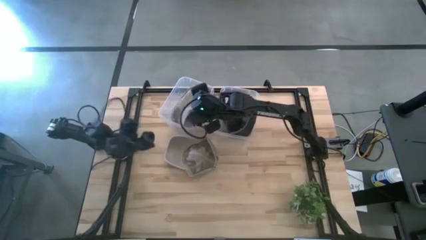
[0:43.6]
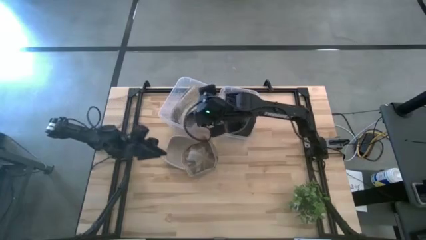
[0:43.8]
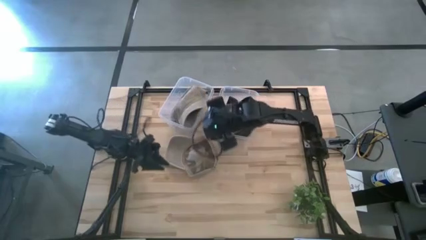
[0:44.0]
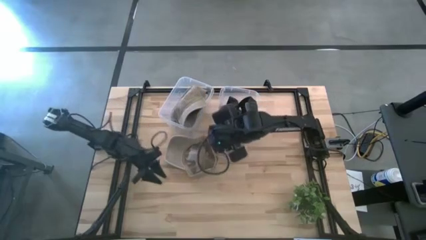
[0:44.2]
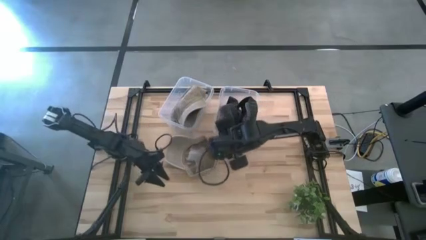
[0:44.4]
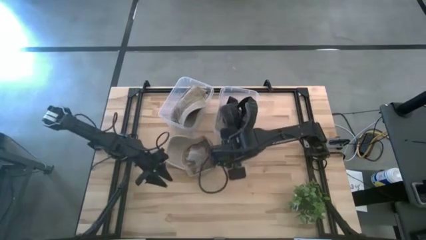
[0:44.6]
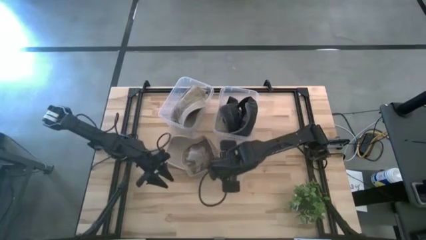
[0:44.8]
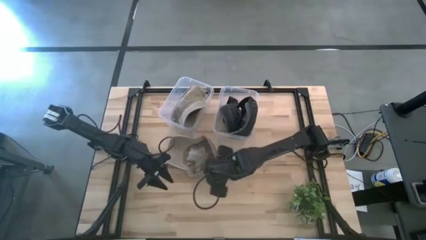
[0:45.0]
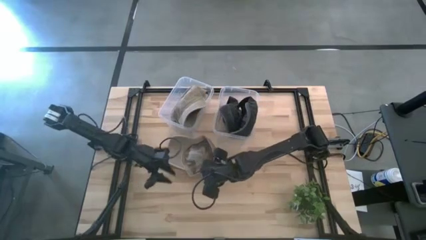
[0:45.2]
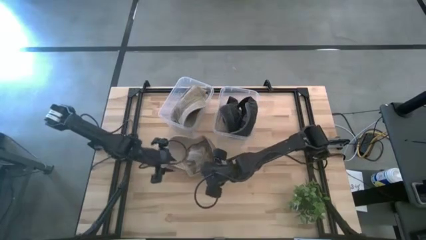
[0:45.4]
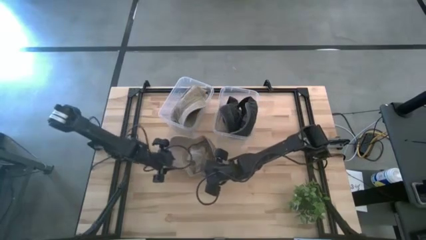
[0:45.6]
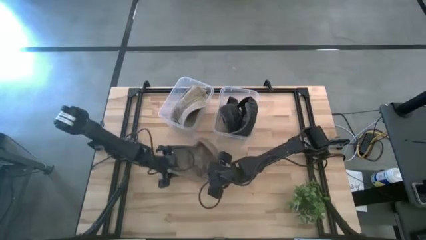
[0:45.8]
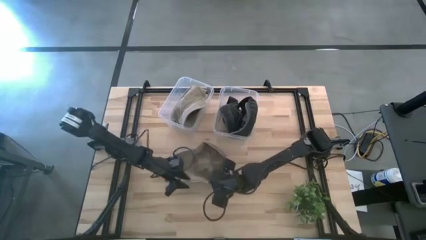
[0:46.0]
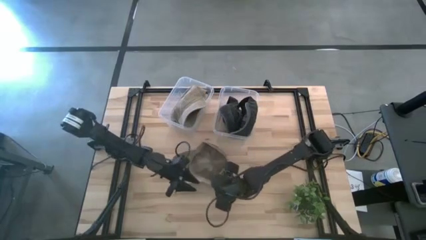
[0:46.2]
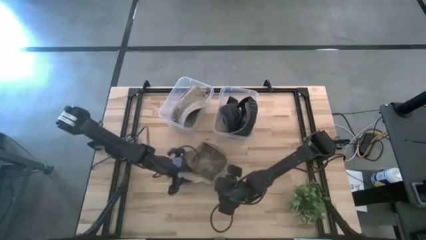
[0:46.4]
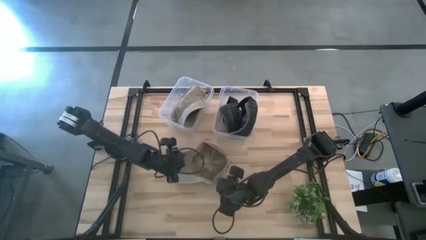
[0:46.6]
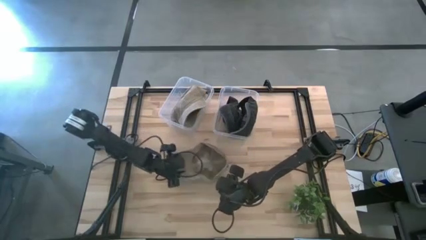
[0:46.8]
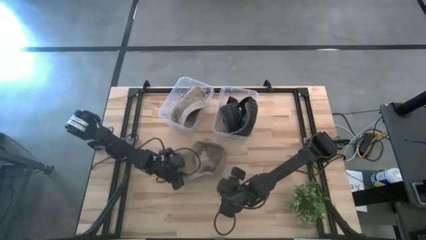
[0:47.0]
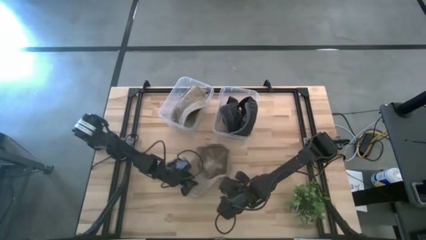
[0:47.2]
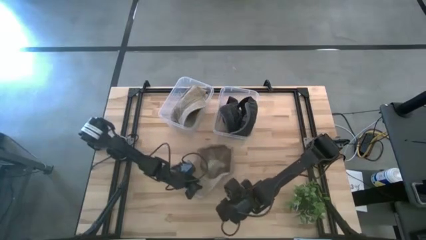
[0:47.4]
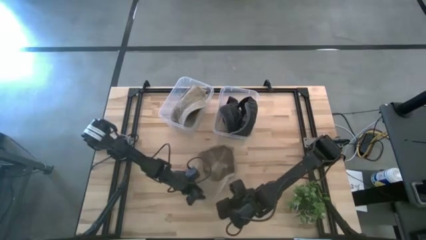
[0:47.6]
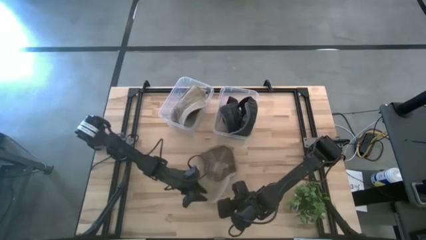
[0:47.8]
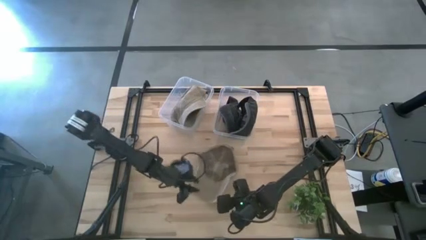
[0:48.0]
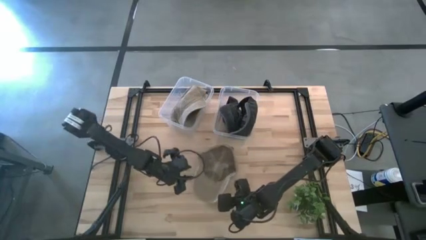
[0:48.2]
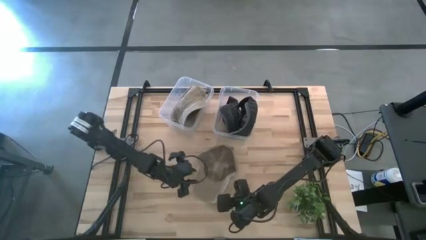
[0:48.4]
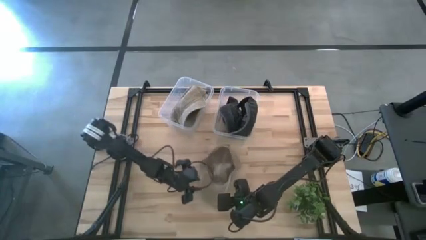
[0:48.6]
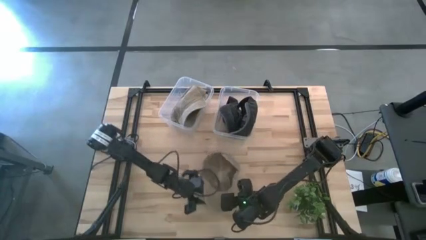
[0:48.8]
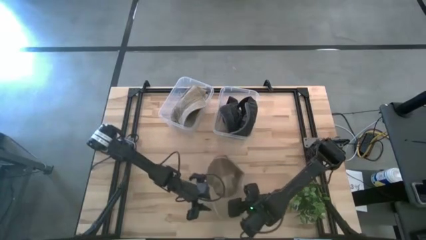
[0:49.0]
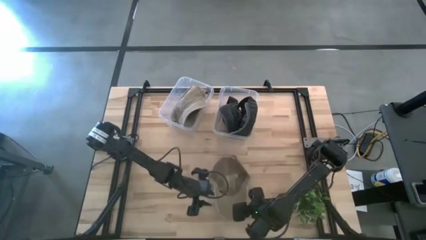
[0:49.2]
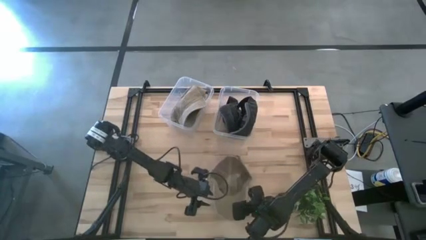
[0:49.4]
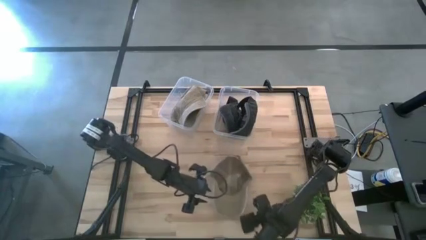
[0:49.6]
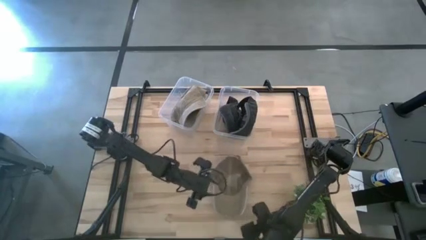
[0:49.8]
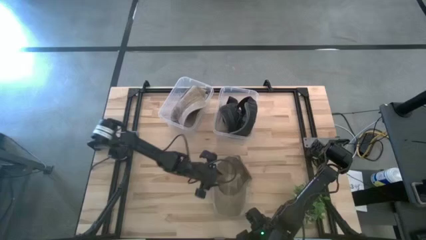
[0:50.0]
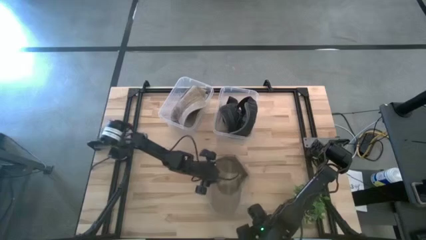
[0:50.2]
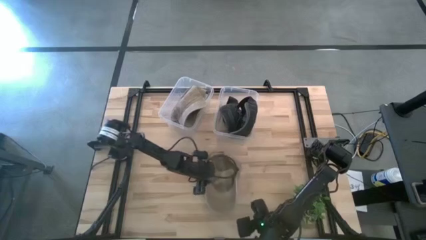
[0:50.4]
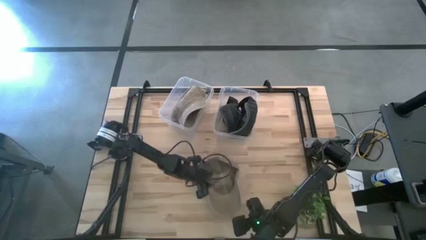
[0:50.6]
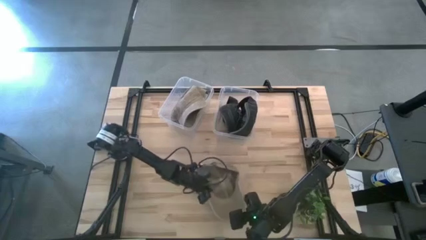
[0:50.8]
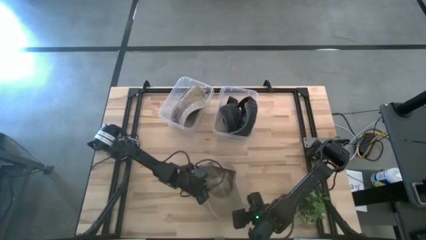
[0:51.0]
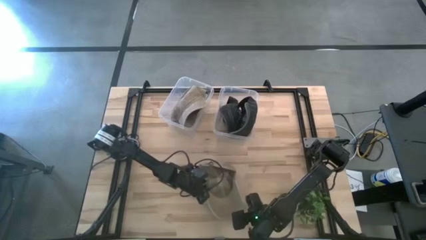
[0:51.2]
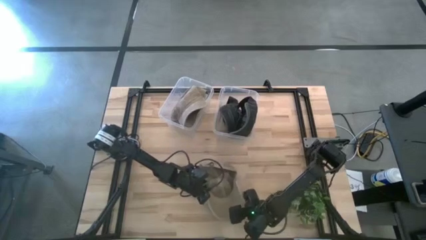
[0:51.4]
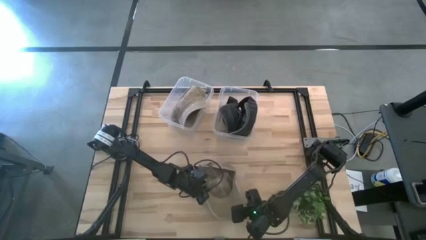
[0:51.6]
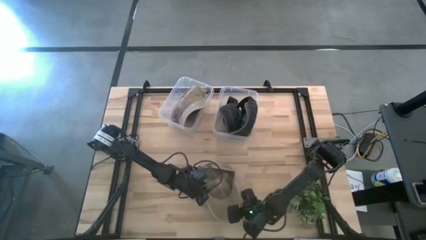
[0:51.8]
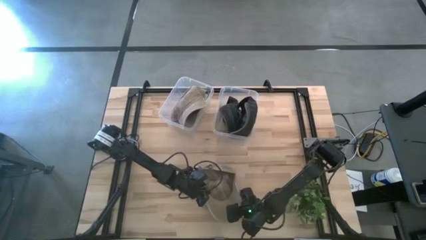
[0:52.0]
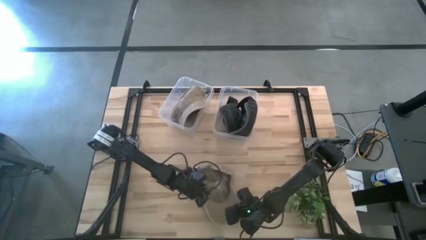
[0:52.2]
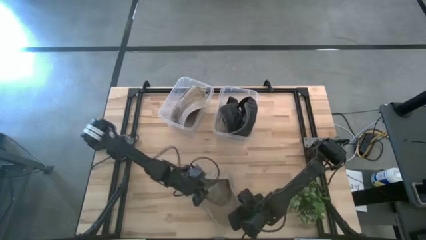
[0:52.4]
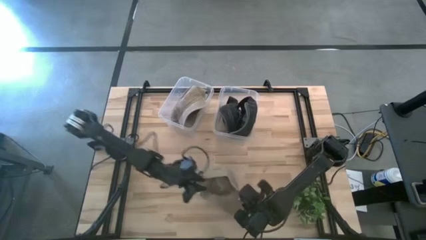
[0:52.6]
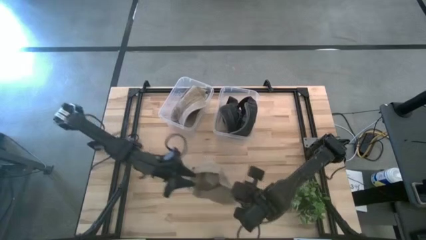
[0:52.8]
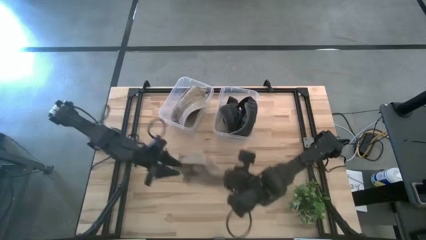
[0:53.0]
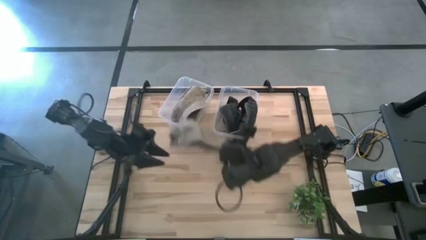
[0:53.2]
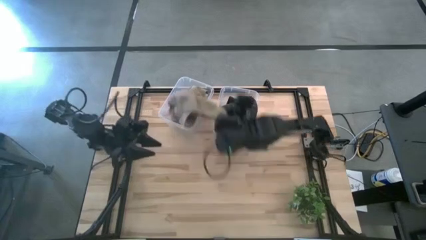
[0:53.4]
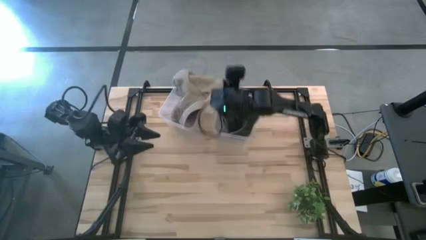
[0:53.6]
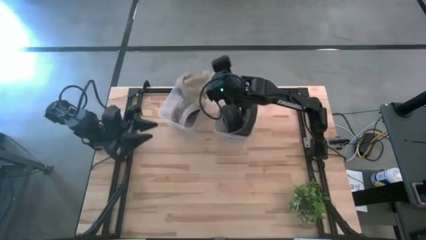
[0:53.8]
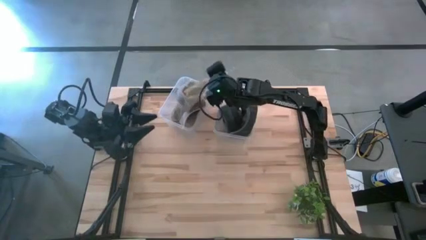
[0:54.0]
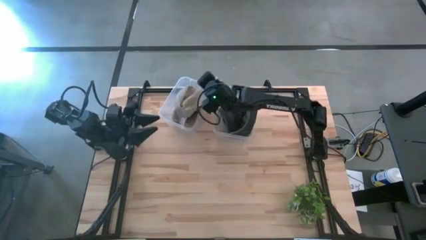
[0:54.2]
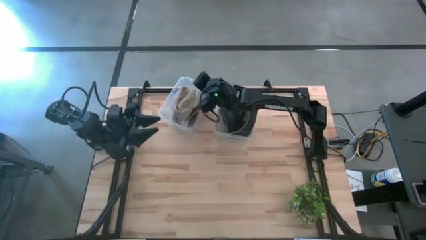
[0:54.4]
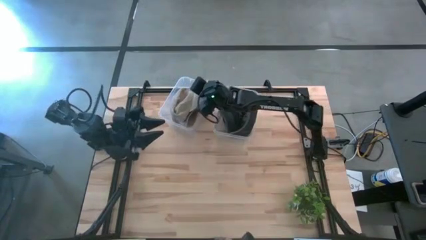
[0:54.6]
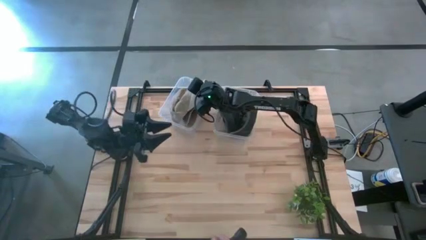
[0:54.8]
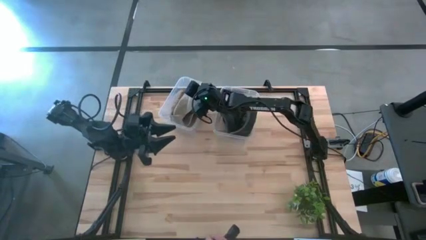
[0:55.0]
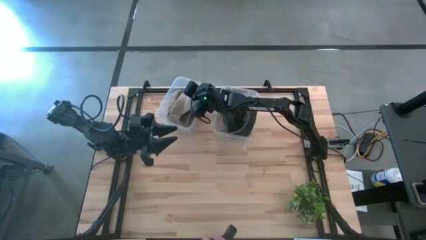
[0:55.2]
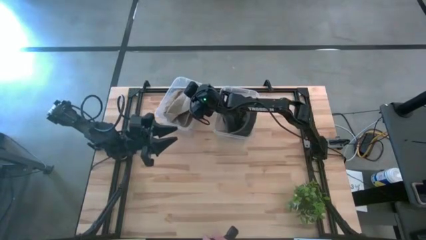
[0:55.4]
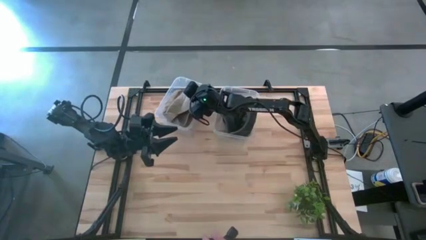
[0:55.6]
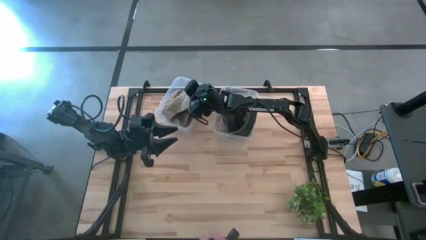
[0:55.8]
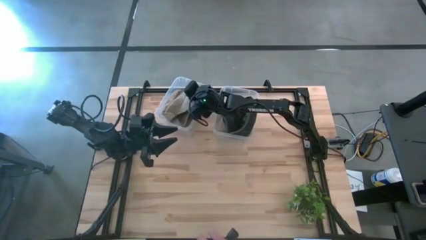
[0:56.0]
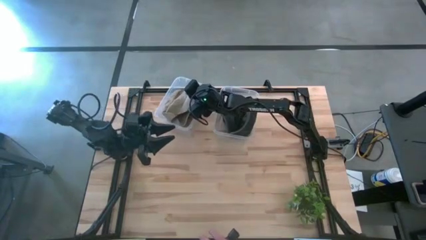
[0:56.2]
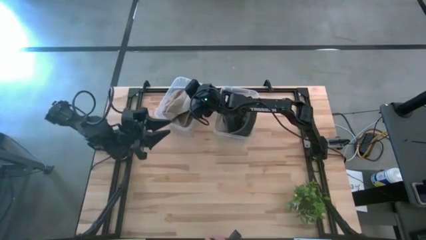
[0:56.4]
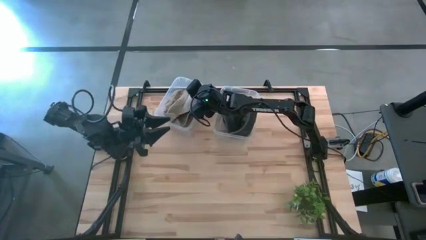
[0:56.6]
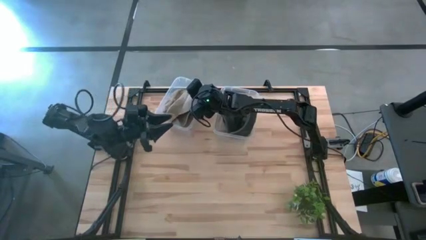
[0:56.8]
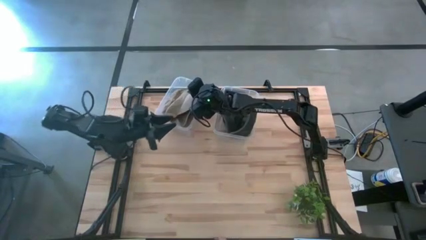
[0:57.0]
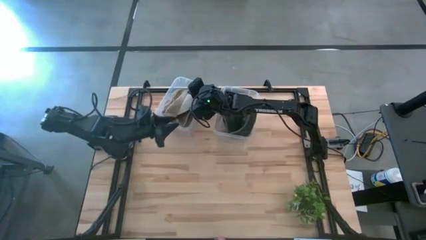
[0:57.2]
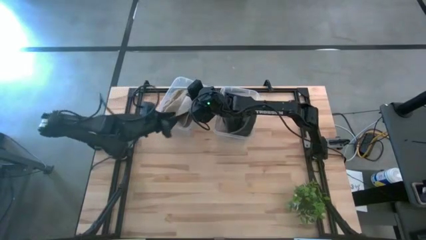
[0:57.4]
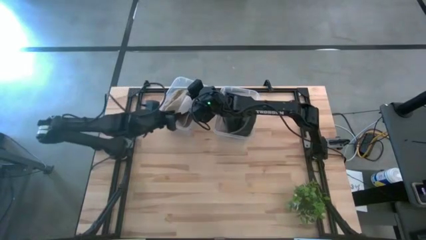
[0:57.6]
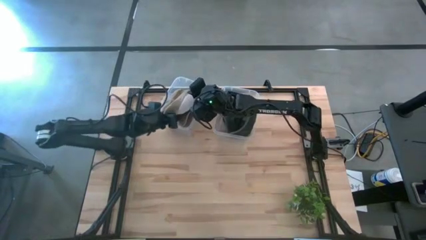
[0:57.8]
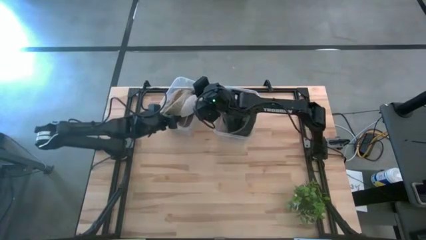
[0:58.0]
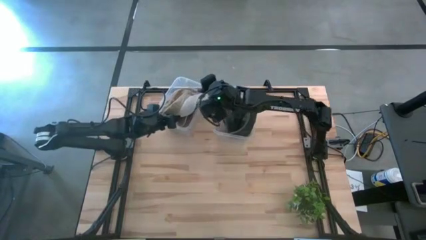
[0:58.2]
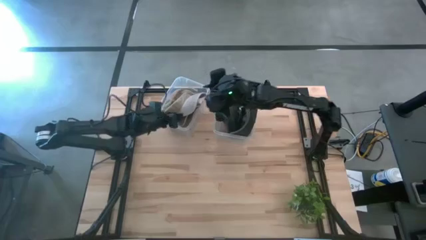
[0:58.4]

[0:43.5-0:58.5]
Task: Pick & Place hat
Put the brown cap into the left transparent bin
